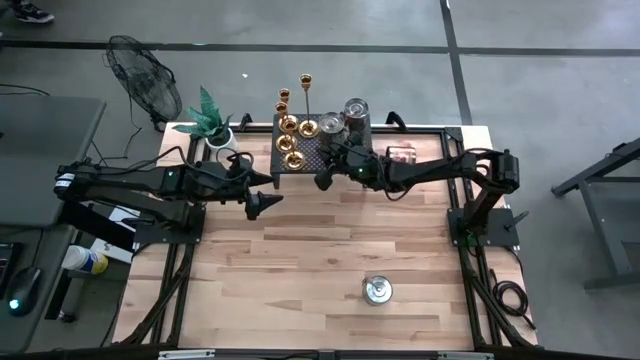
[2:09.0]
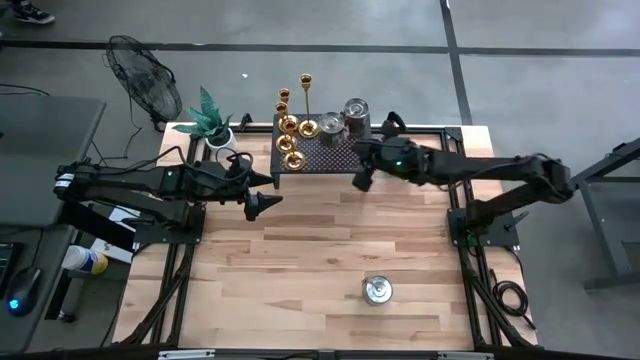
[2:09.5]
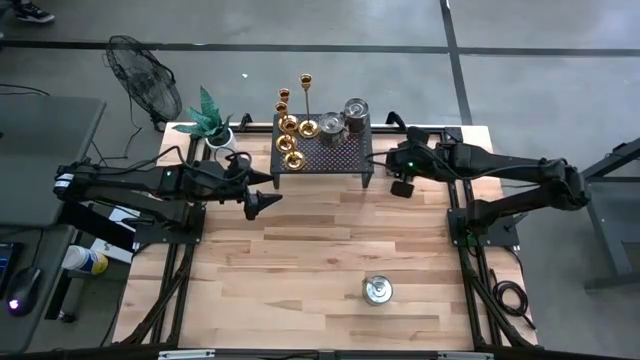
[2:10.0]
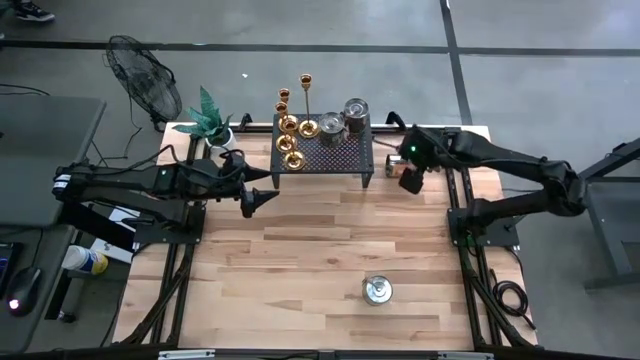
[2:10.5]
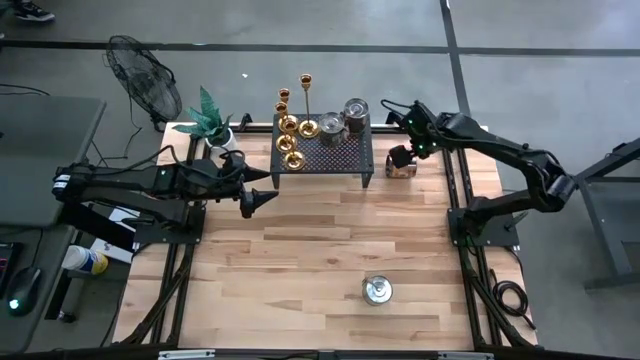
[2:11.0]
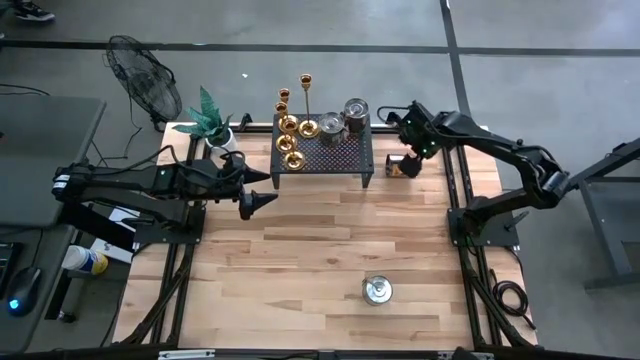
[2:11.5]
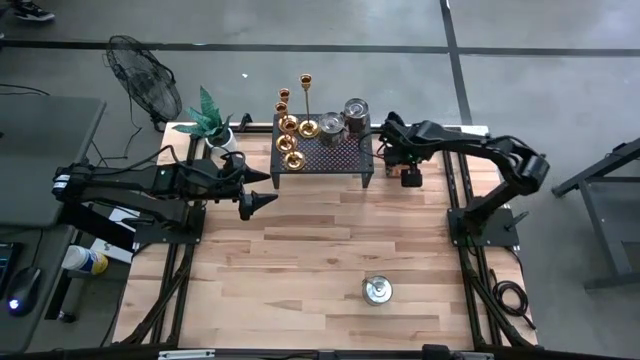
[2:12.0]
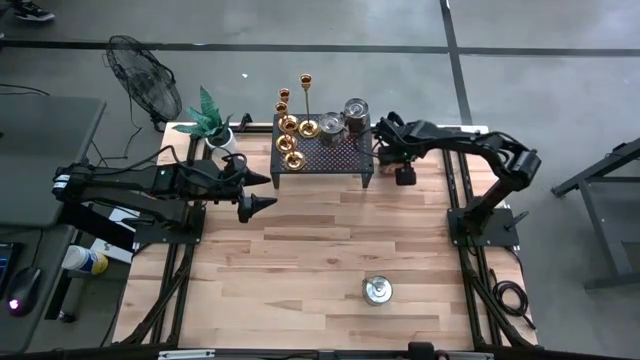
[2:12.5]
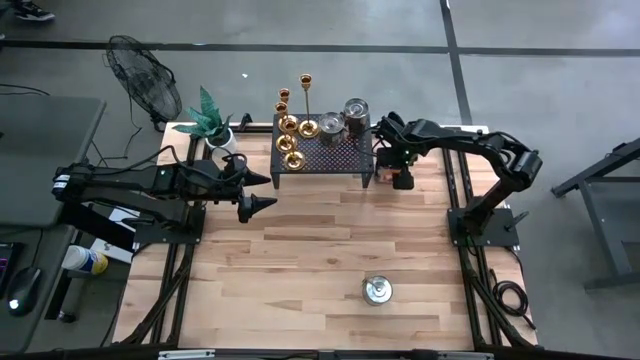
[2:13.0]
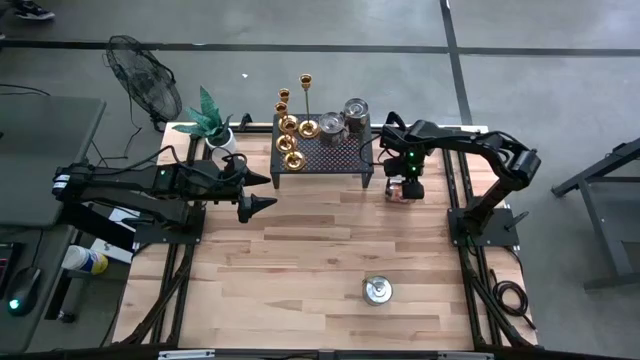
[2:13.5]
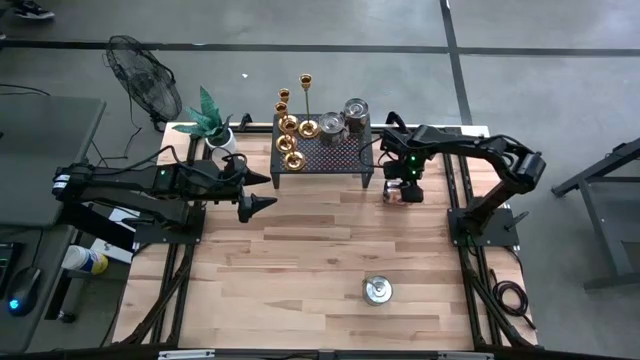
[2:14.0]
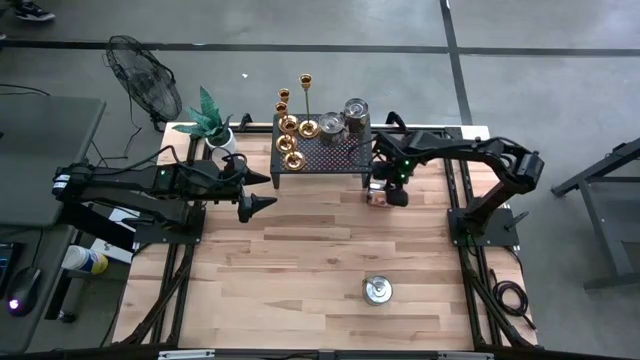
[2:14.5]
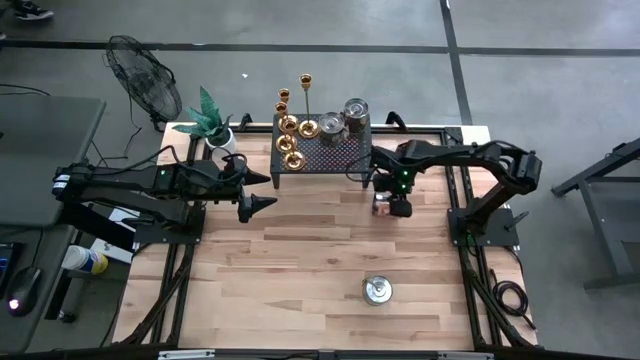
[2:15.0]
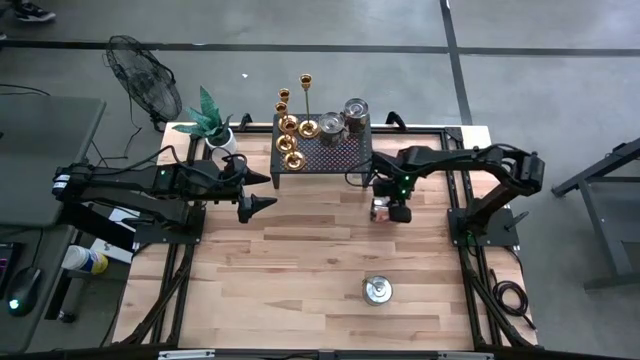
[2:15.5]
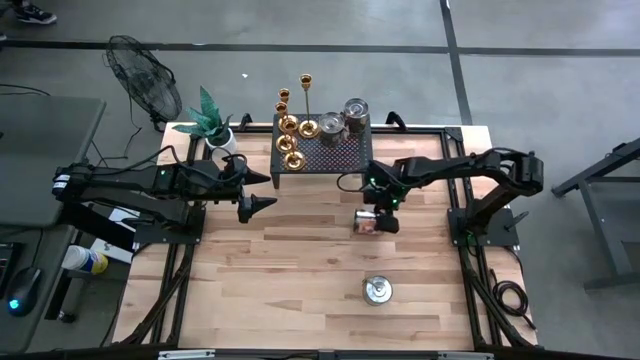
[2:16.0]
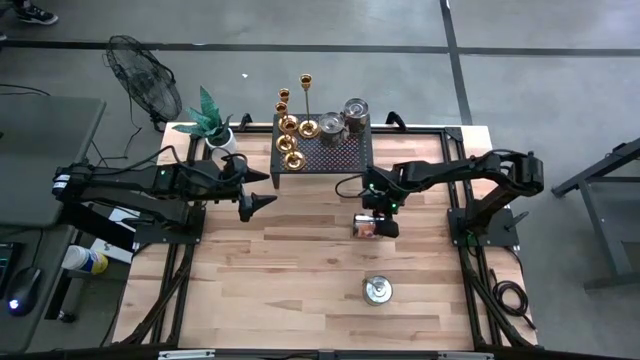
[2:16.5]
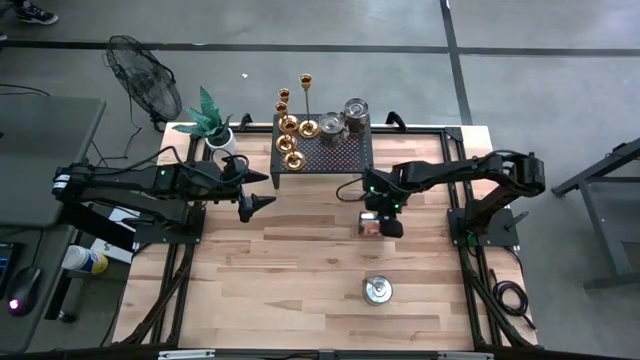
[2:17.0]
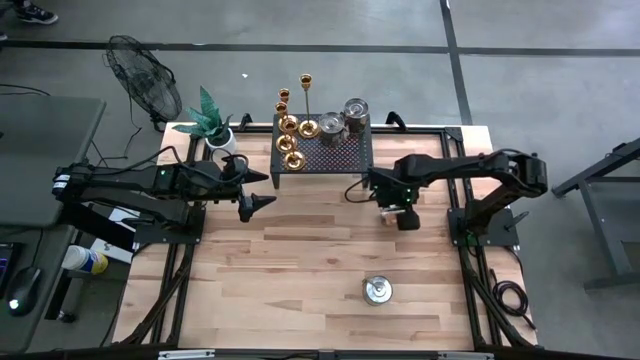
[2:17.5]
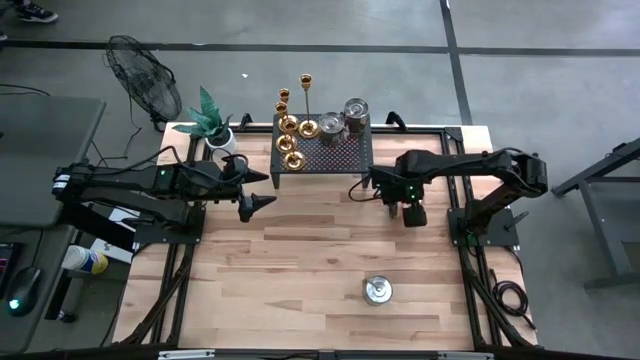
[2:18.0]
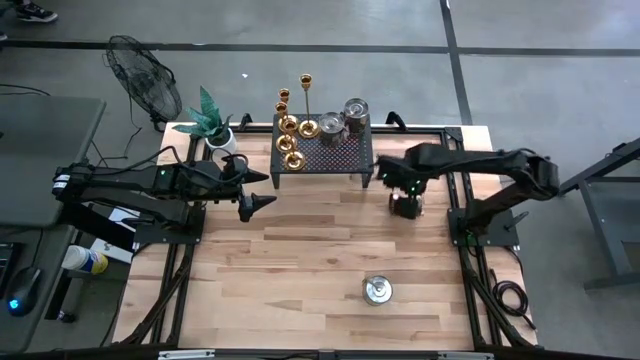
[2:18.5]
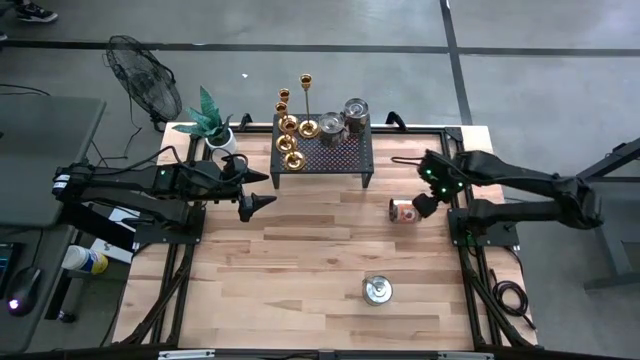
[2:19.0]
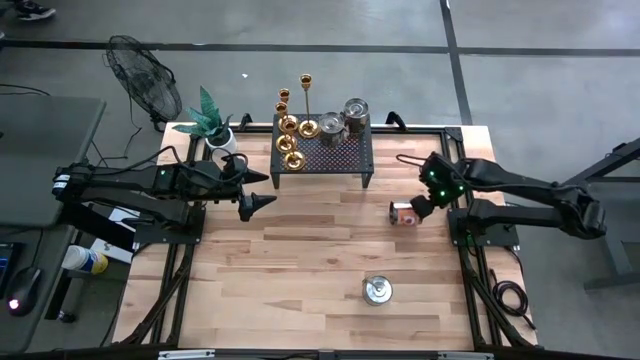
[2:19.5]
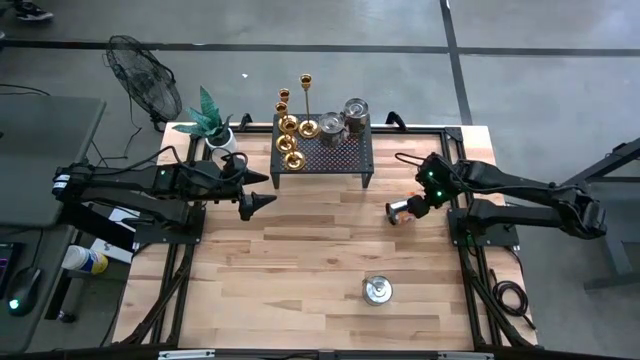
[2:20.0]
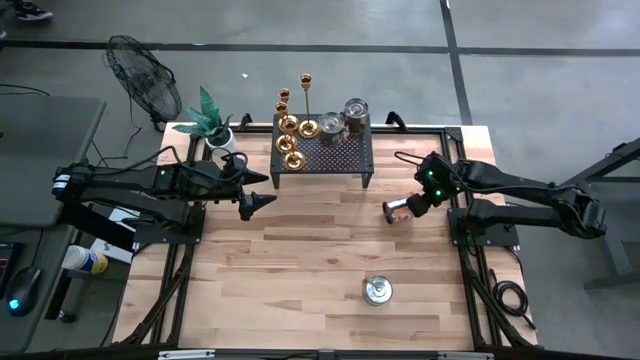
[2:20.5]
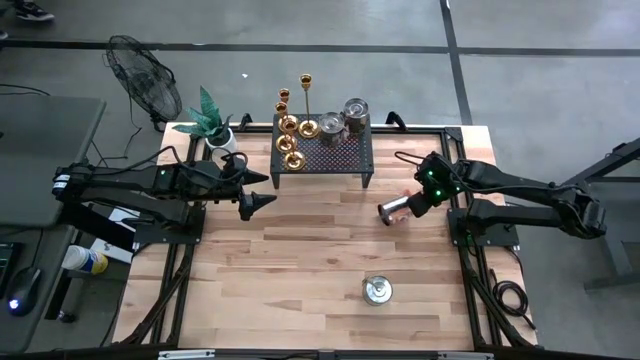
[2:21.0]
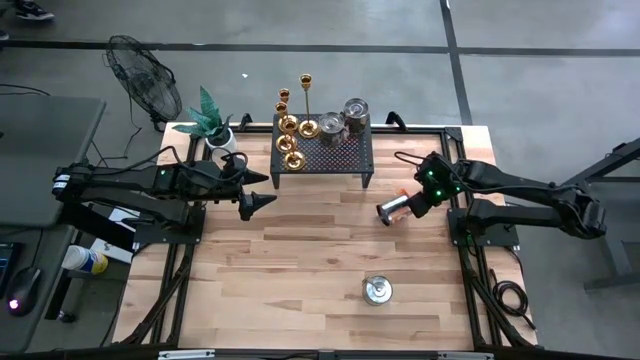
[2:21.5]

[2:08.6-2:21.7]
Task: Pick & Place candle stick holders
Put the orange scented candle on the shelf

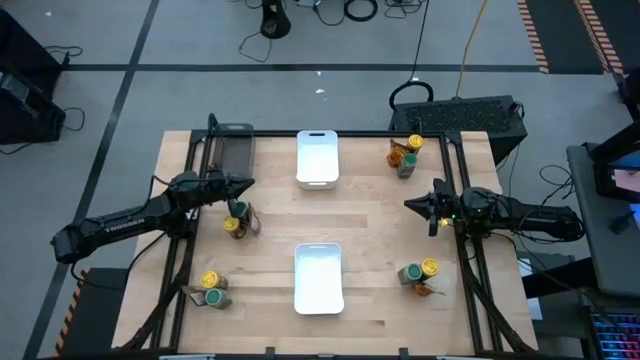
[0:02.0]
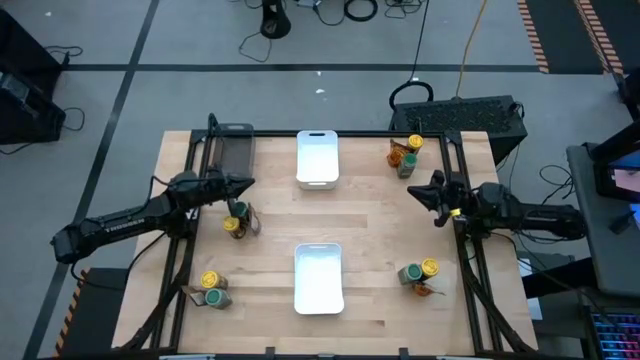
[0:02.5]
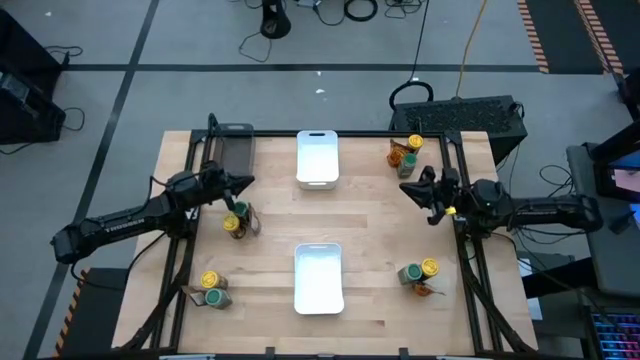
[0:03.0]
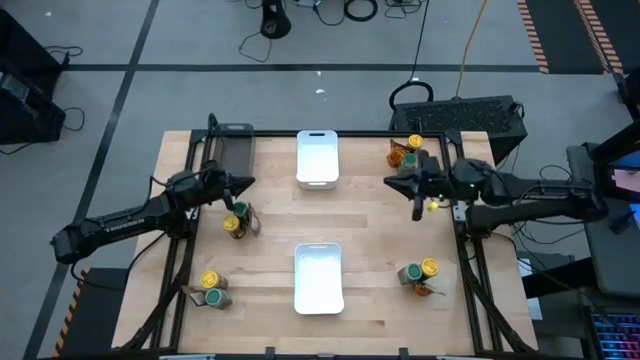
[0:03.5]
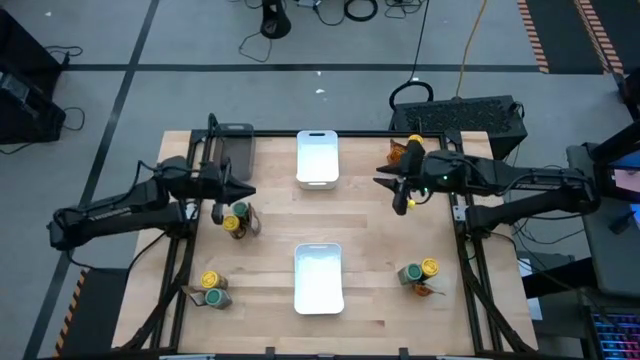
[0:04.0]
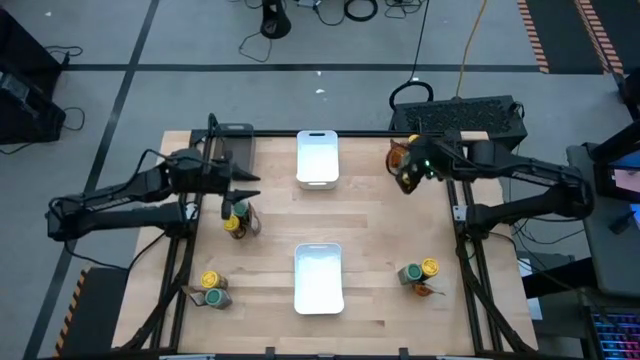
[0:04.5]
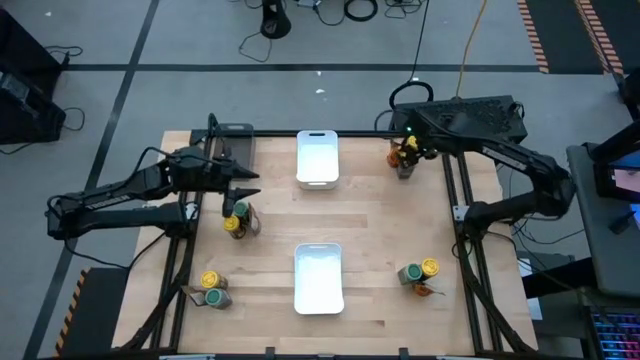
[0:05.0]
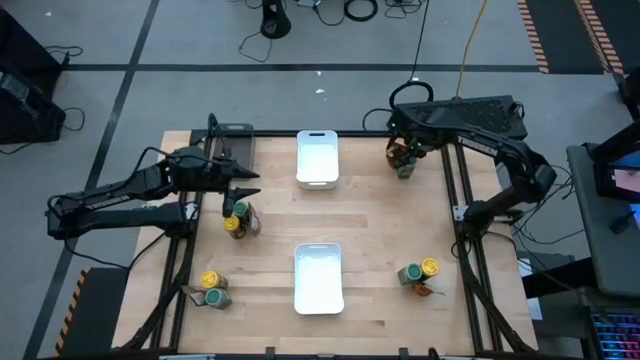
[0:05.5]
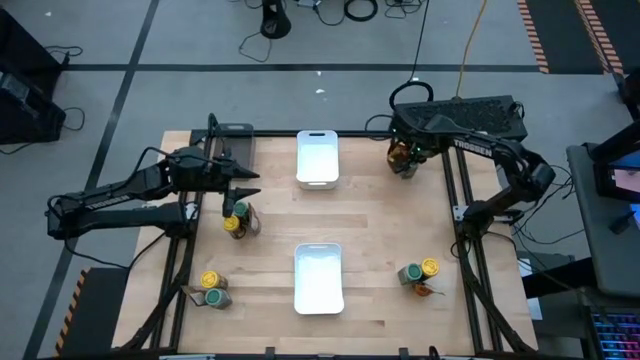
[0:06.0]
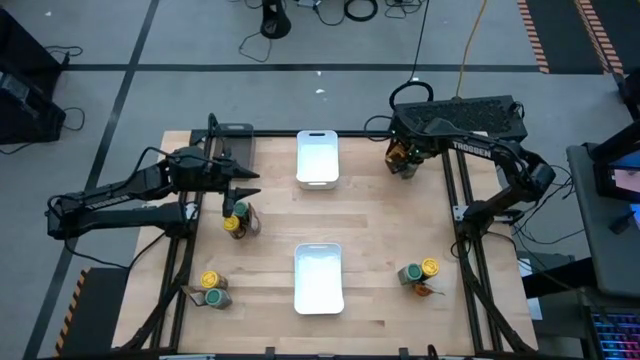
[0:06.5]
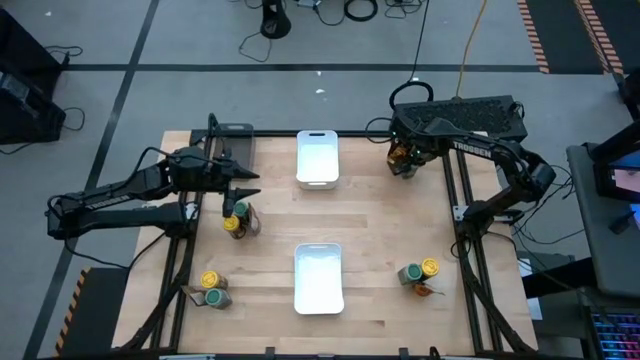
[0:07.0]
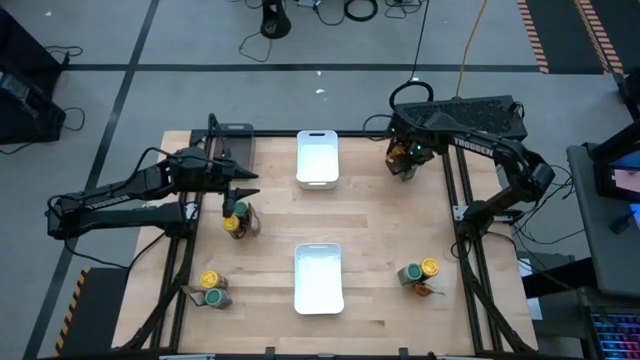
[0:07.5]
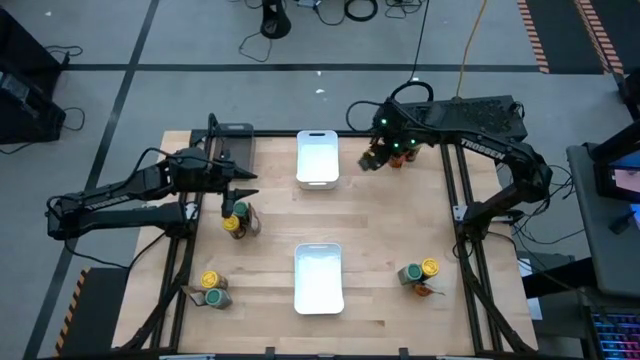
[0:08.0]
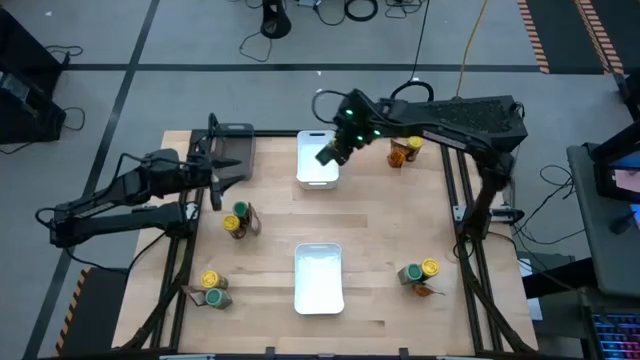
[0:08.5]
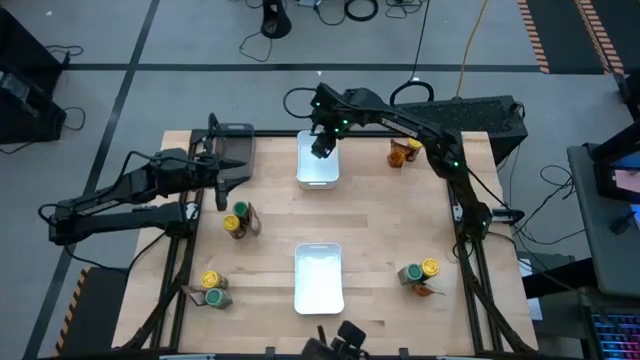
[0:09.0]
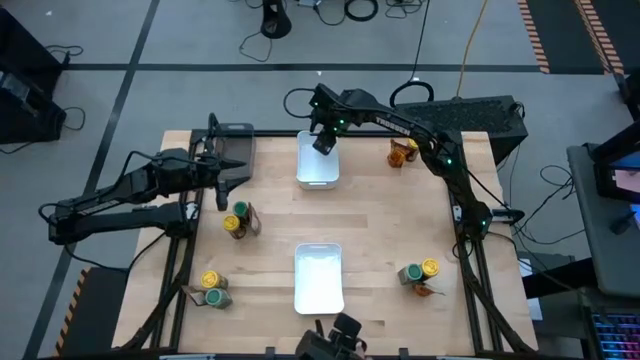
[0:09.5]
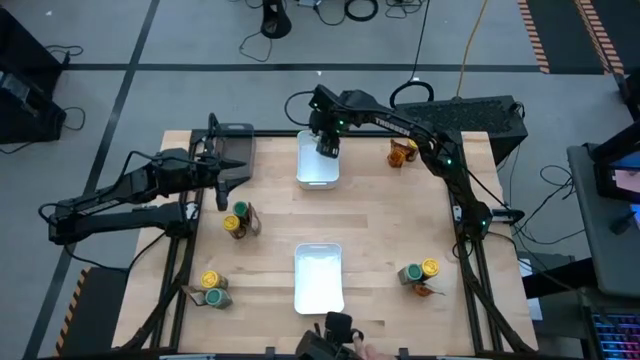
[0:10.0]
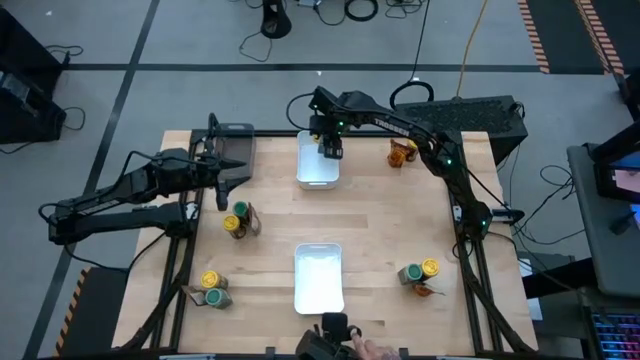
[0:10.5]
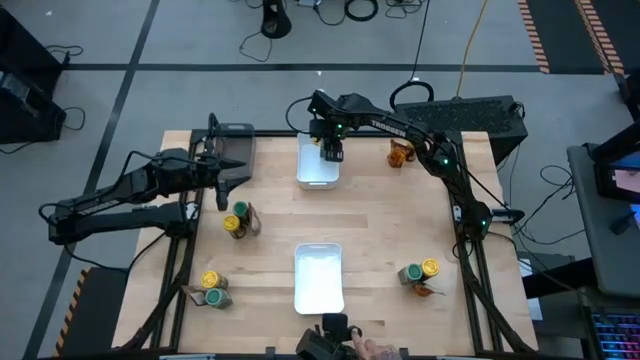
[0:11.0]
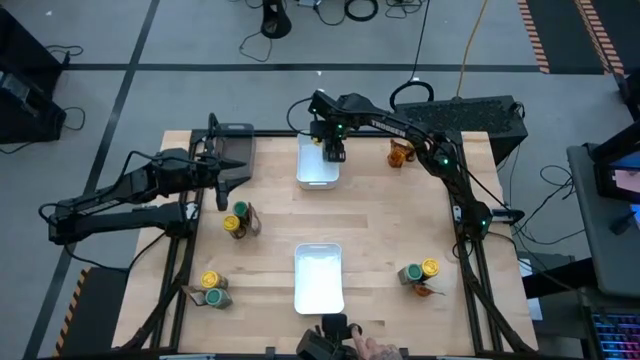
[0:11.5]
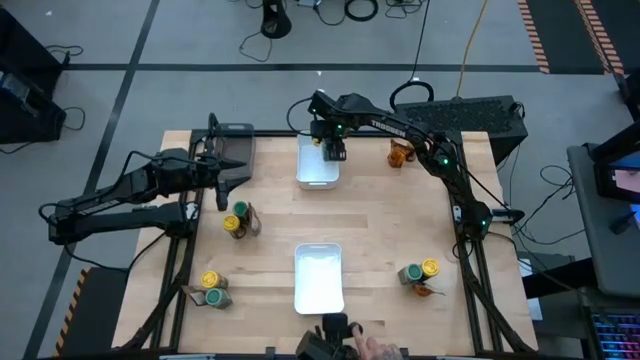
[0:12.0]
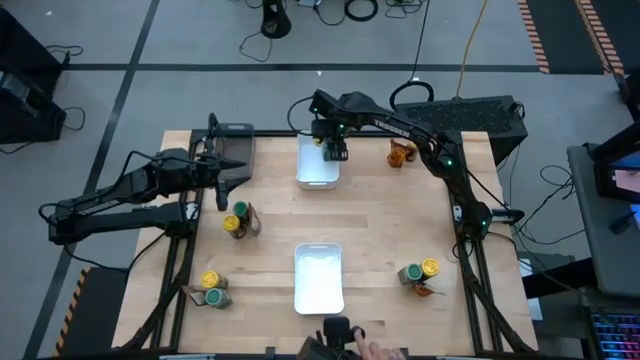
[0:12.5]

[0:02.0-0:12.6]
Task: Sort spices by type
Put the top right green spice bottle into the top white bin
